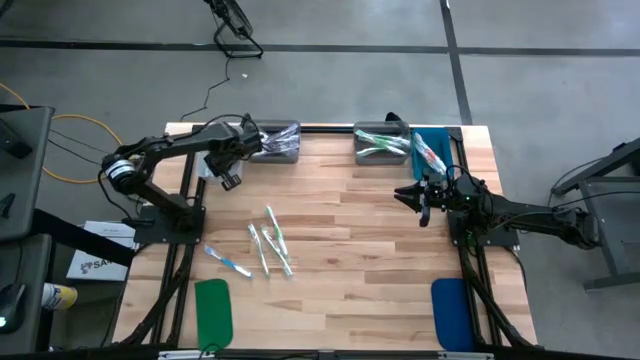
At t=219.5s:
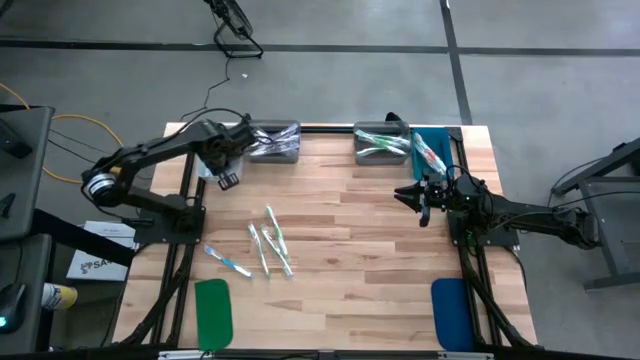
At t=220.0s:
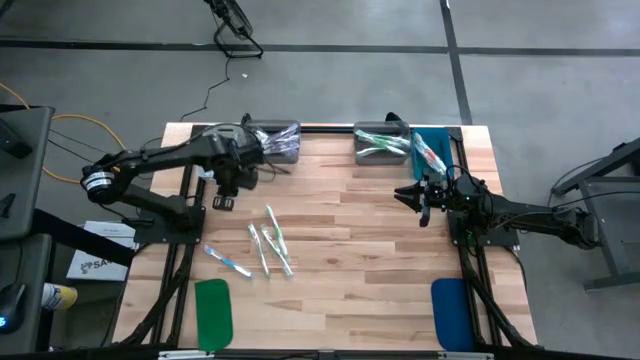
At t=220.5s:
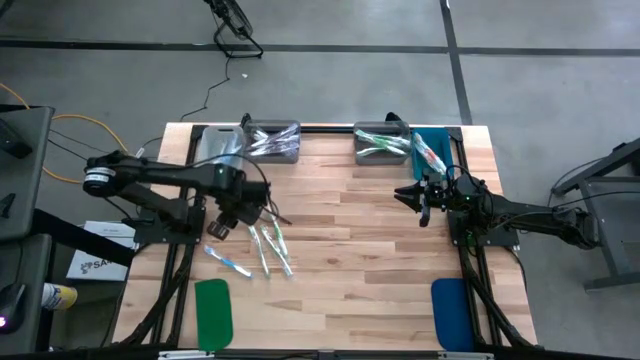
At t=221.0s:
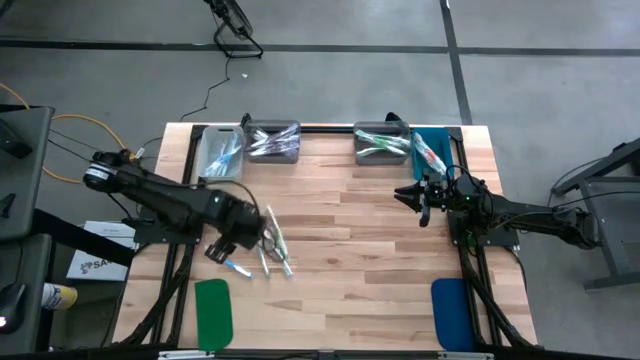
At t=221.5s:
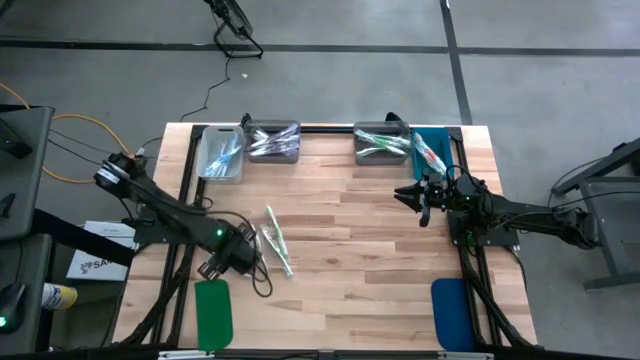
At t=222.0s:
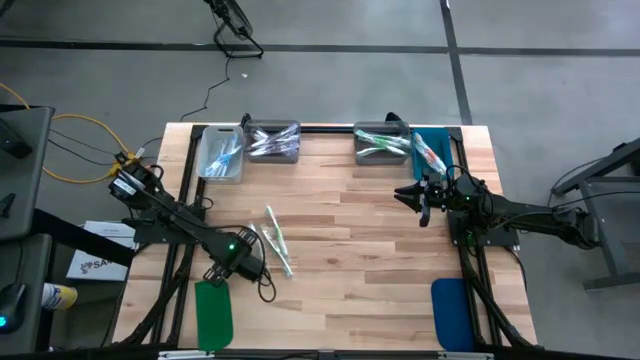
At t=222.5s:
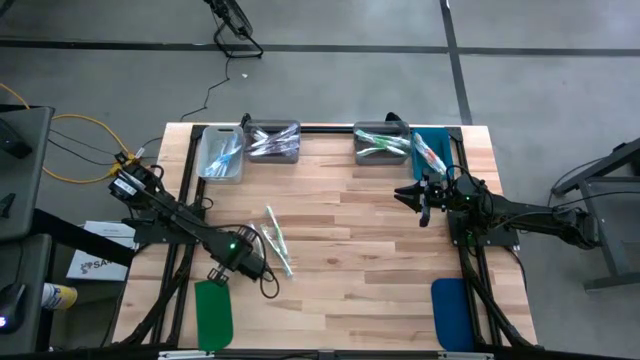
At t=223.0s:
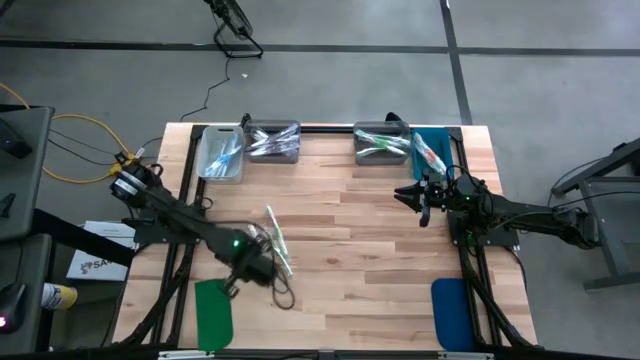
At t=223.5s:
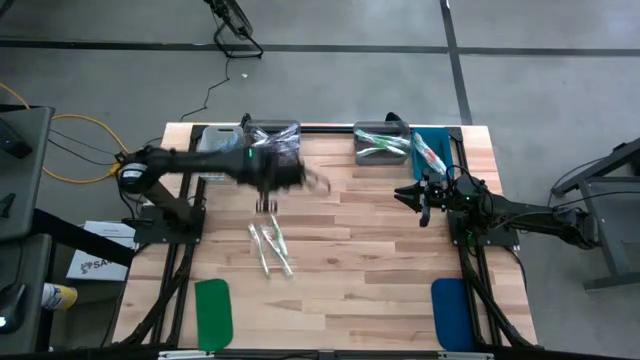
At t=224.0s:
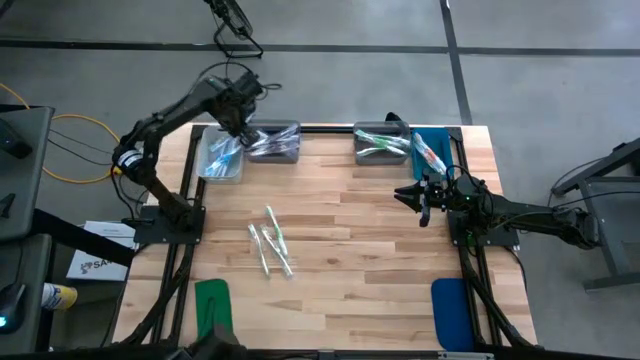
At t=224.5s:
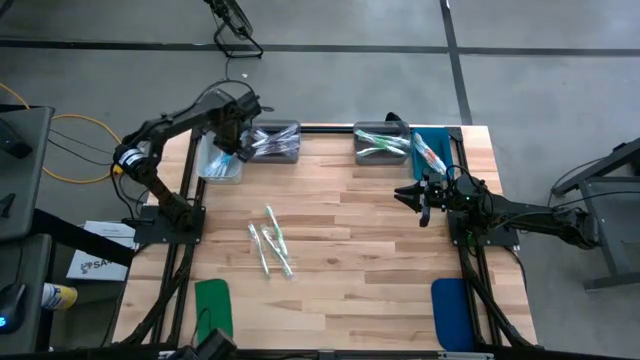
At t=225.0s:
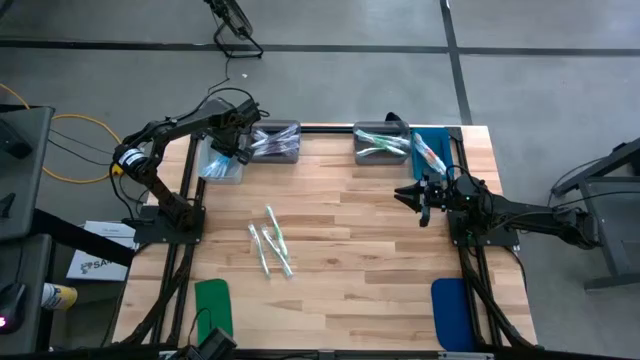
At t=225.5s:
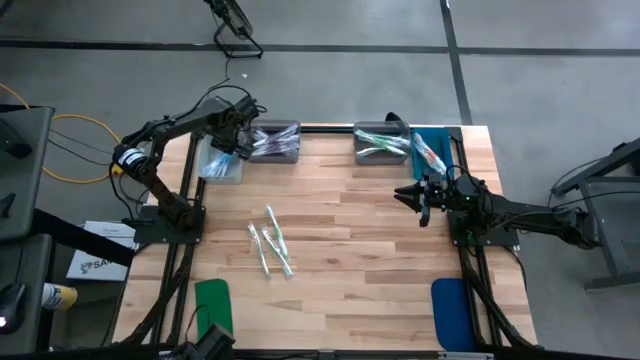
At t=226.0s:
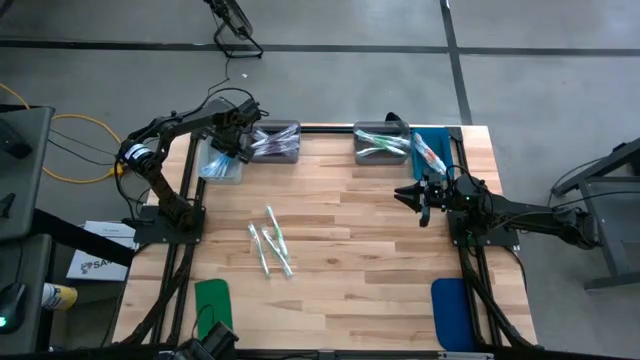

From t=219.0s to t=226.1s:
Task: Pick & Place Toothbrushes
Put the blue toothbrush into the white bin

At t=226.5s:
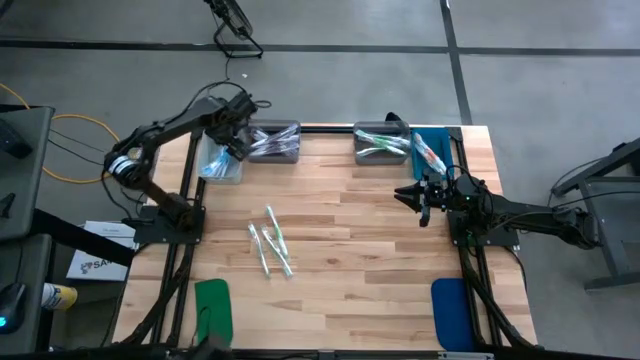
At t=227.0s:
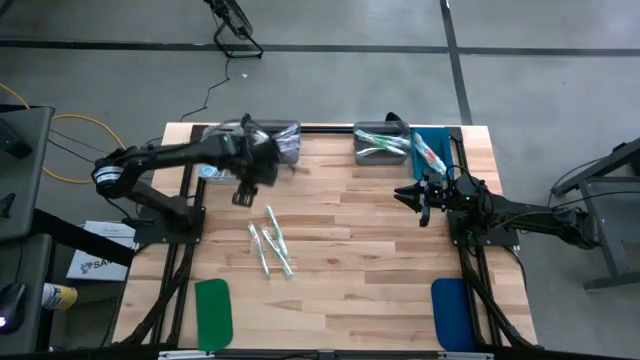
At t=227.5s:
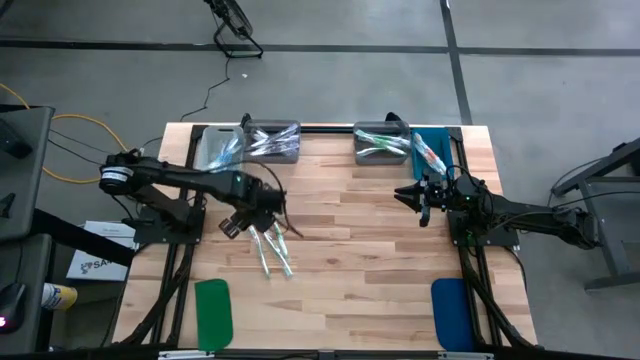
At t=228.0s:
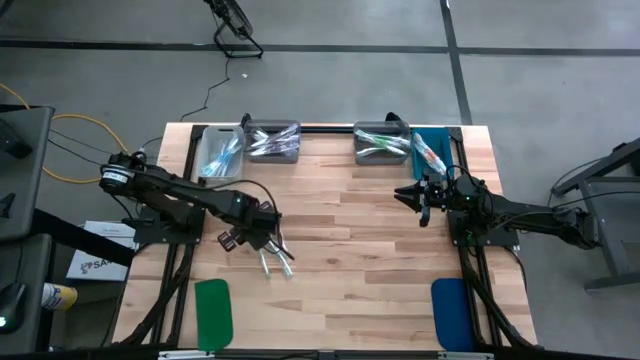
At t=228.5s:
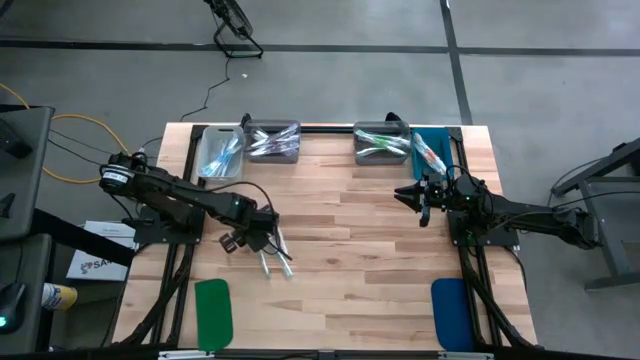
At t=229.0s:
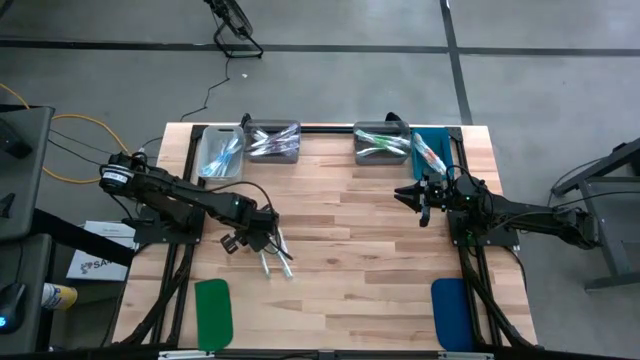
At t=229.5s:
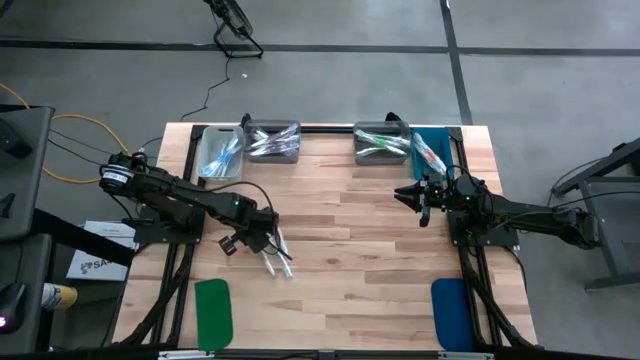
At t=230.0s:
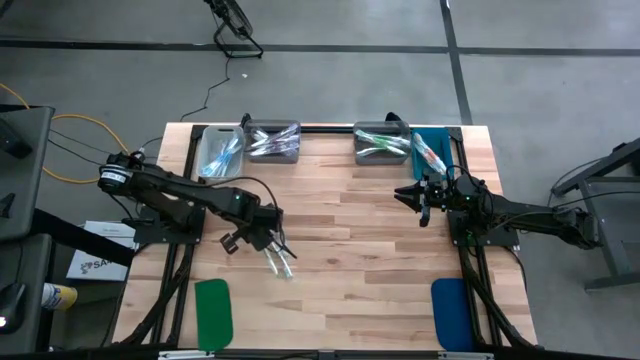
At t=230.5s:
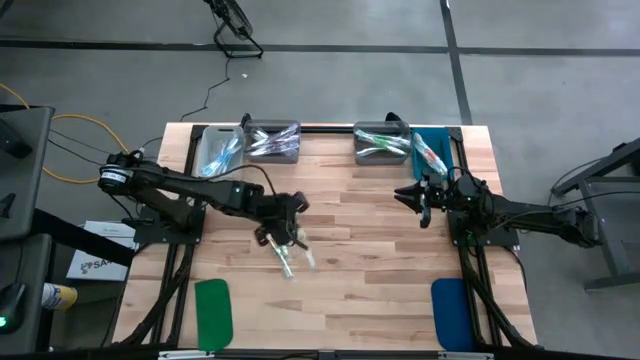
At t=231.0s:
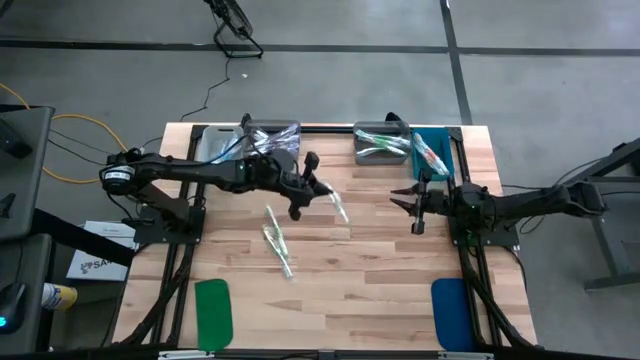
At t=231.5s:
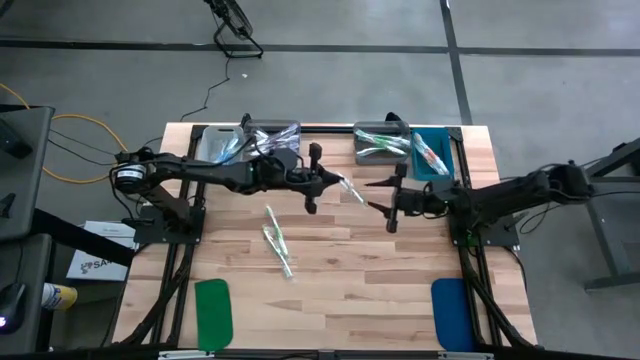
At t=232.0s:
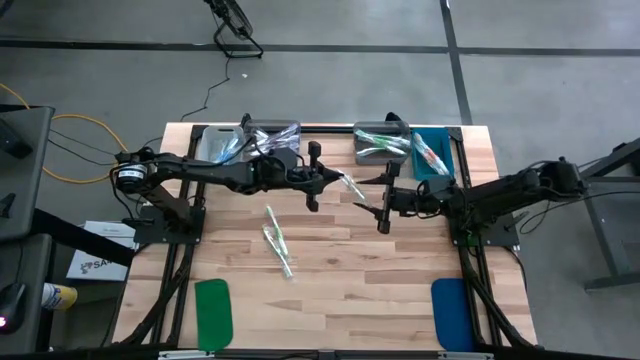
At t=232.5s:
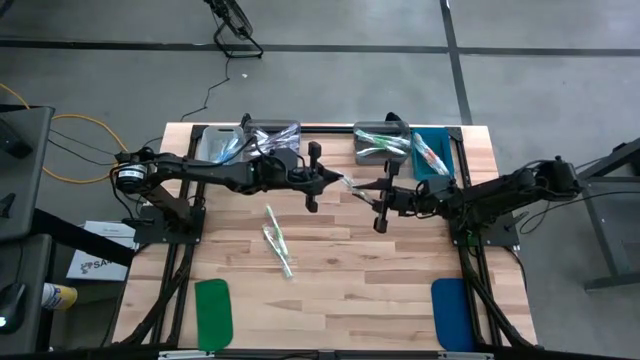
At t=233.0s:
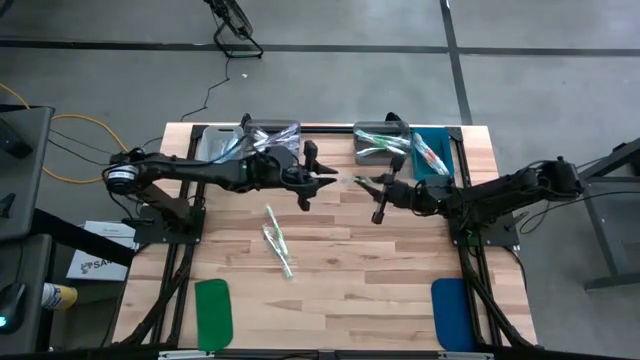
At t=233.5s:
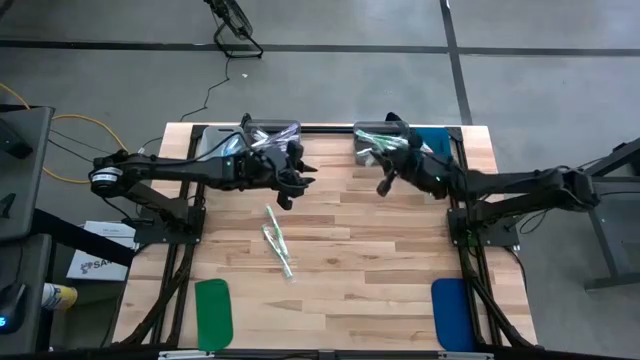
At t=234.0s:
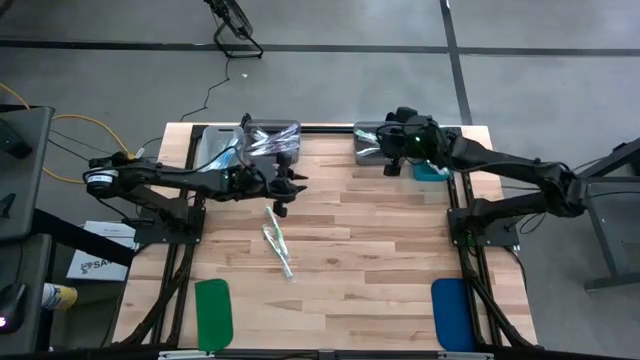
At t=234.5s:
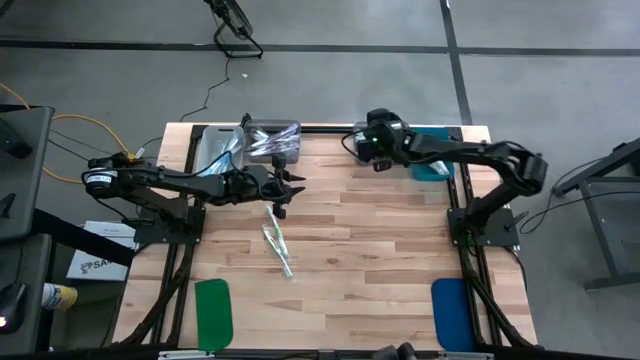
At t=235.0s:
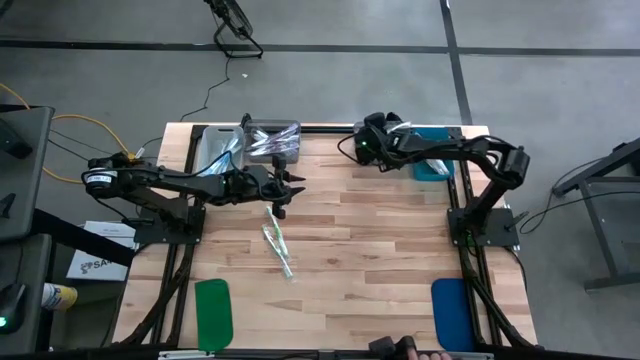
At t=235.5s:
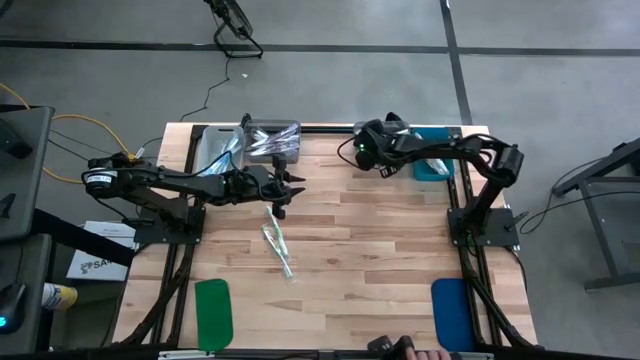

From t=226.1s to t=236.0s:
Put the green toothbrush into the right black bin

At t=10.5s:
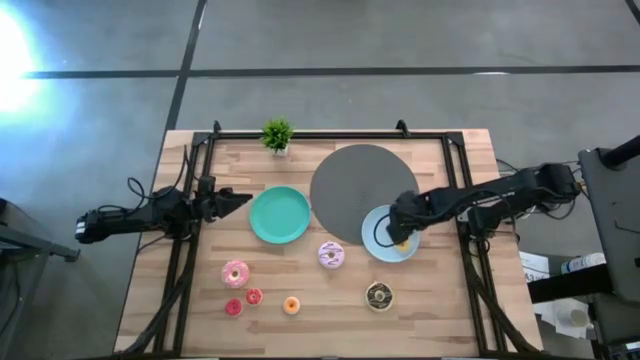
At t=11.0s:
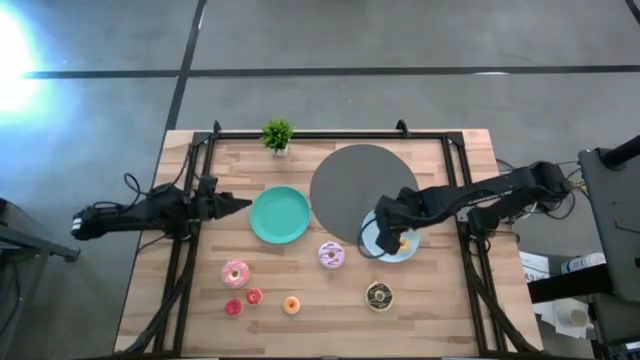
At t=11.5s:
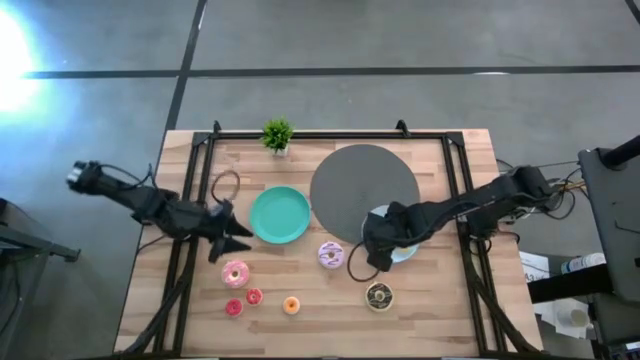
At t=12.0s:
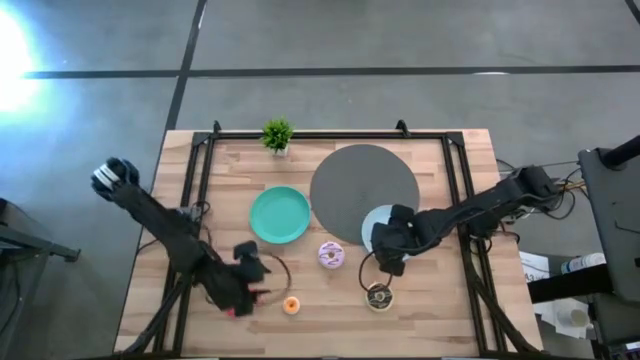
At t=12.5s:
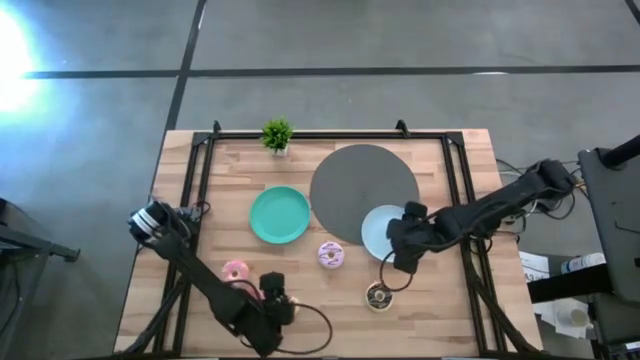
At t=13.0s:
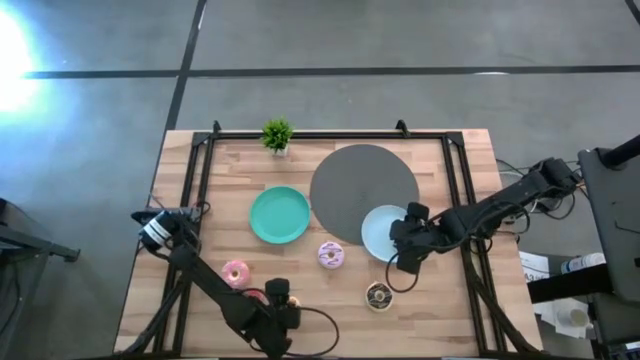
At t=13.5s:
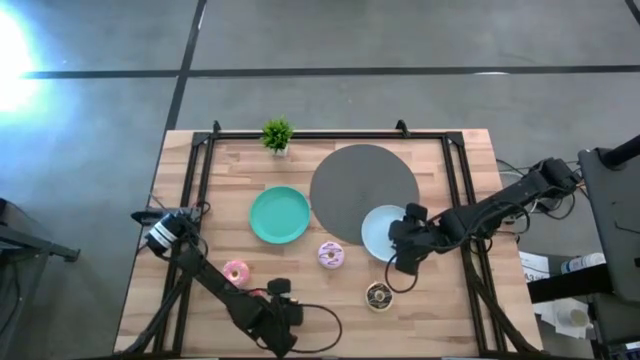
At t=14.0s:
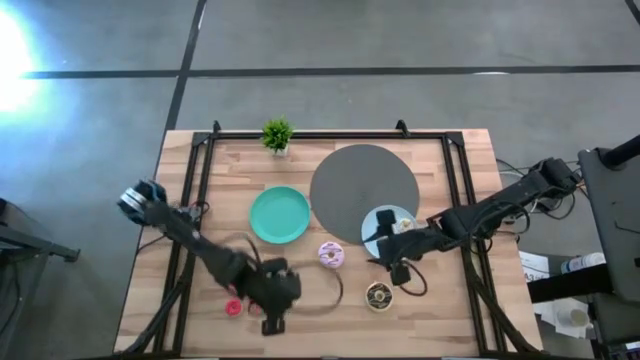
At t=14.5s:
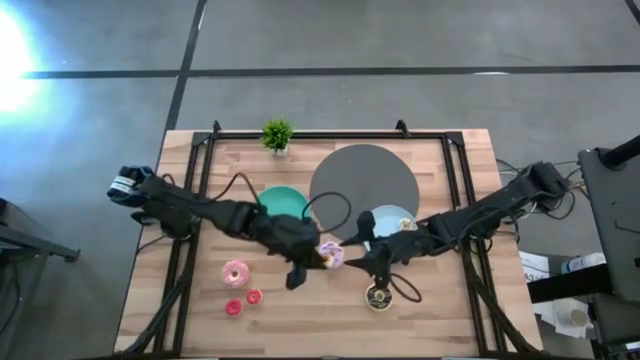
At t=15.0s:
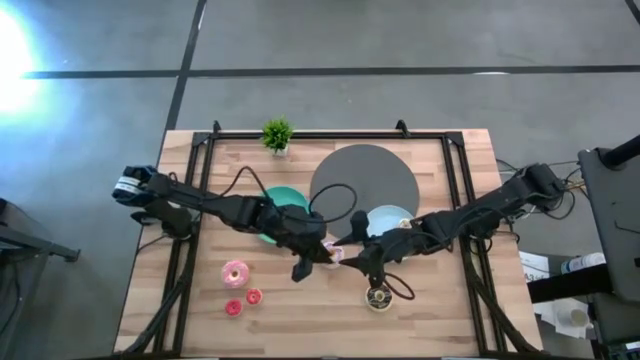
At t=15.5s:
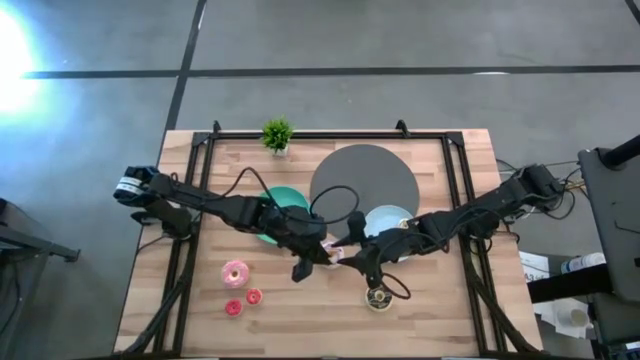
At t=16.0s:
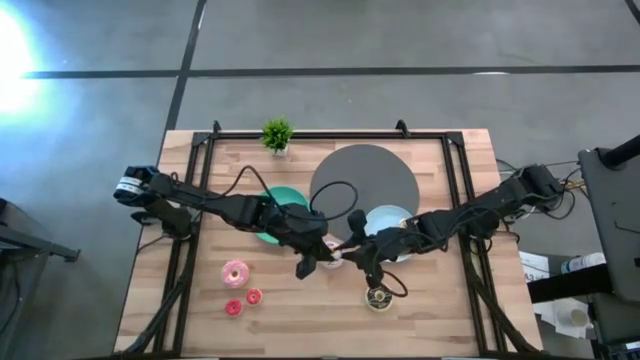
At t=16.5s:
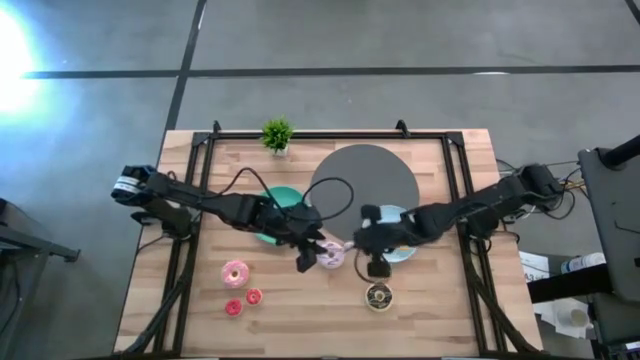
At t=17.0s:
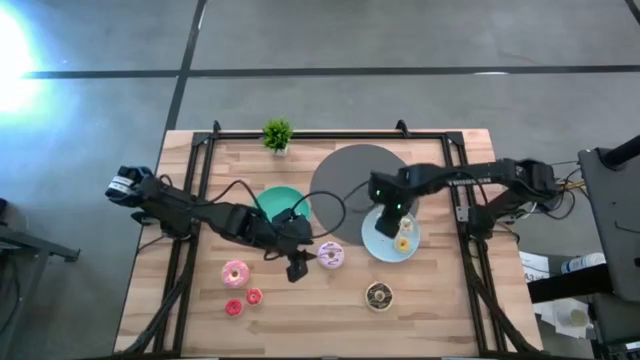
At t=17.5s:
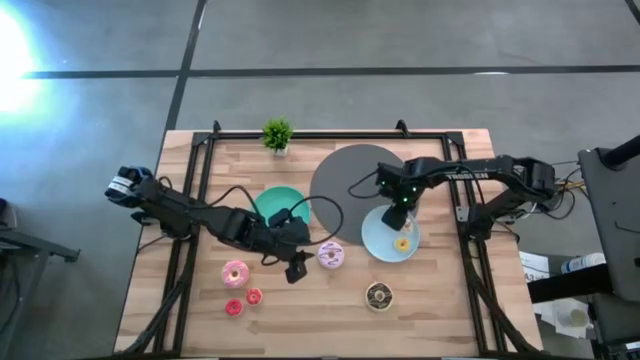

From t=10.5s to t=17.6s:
Task: Pick & Place donuts
Put the small blue donut on the blue plate
